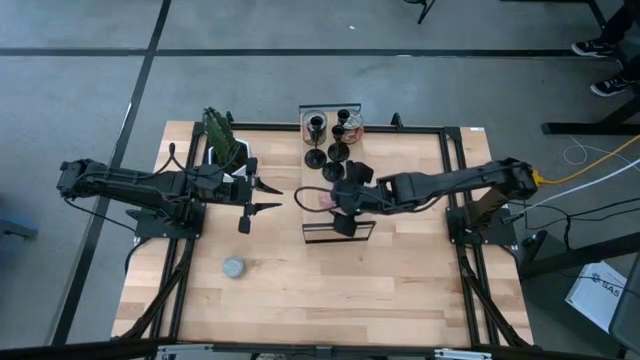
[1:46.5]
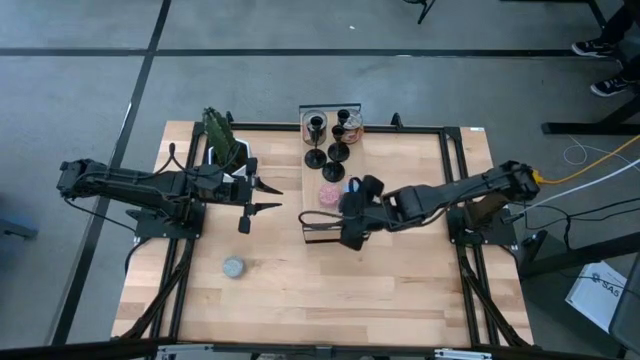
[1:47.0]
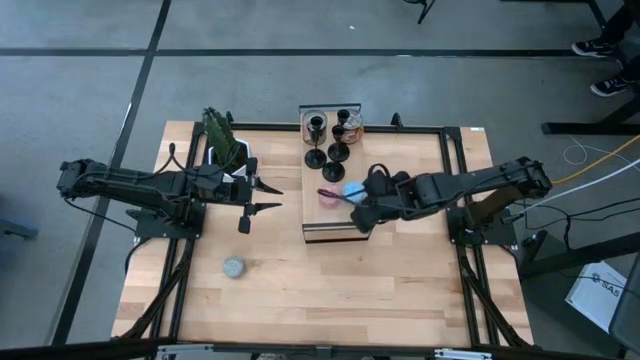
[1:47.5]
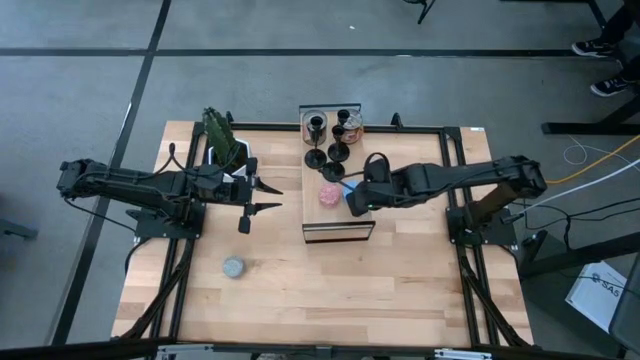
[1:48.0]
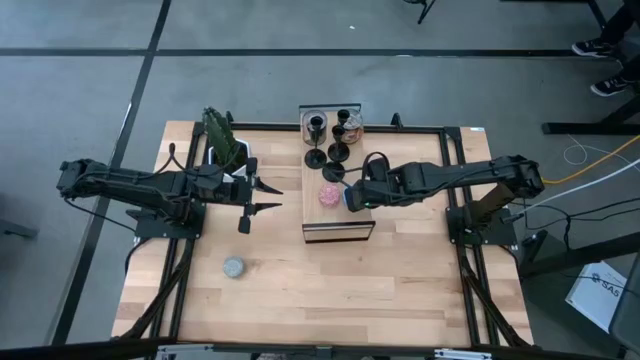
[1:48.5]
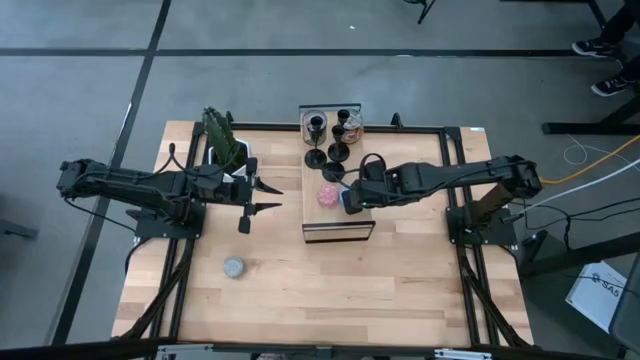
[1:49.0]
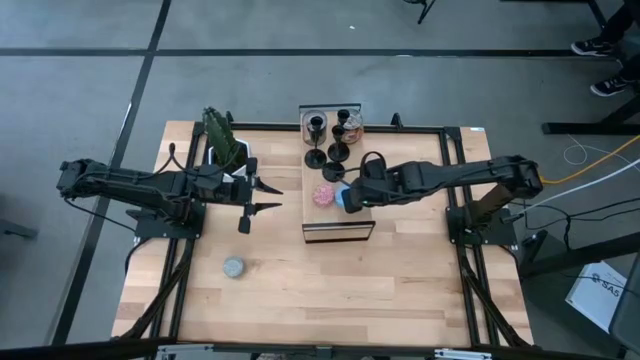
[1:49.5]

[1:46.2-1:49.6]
Task: Pick & Place candle stick holders
Adjust the small blue scented candle on the shelf

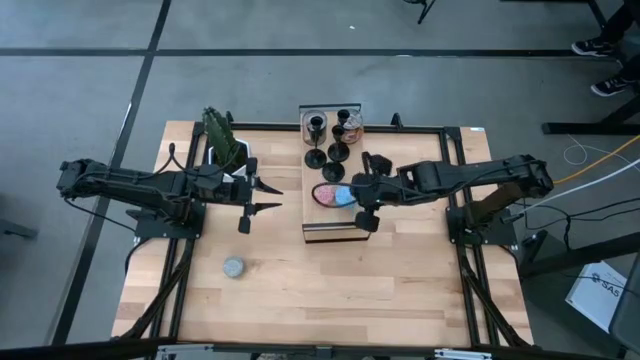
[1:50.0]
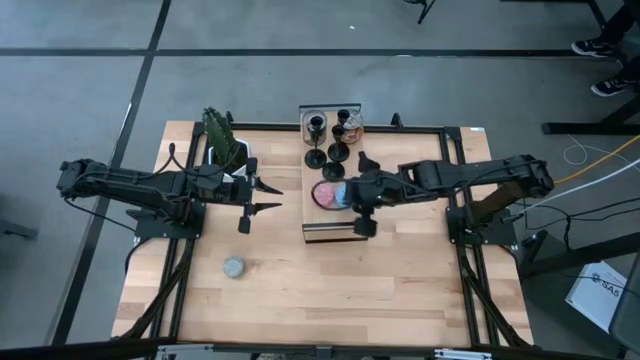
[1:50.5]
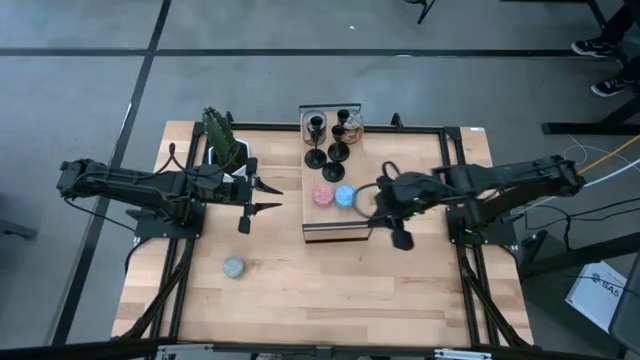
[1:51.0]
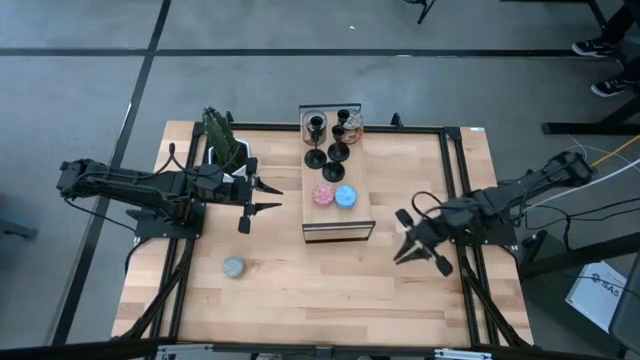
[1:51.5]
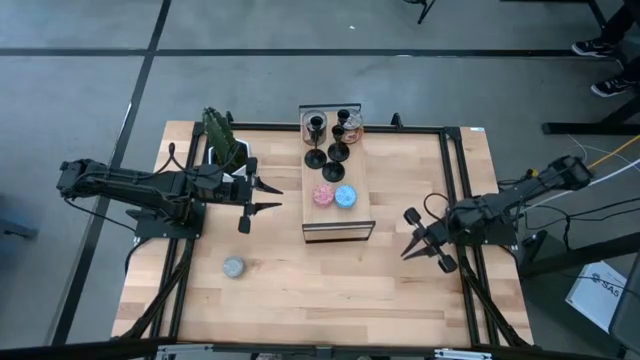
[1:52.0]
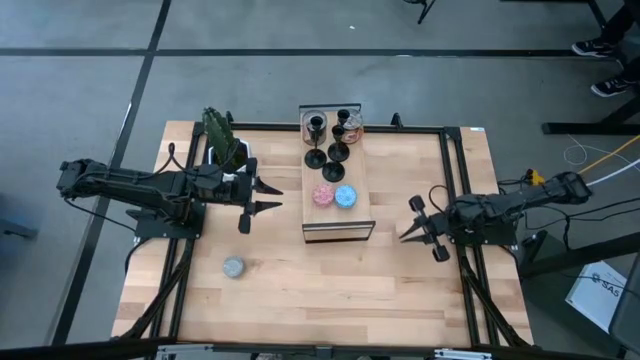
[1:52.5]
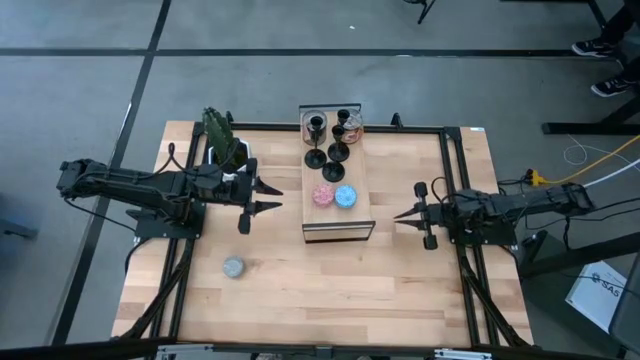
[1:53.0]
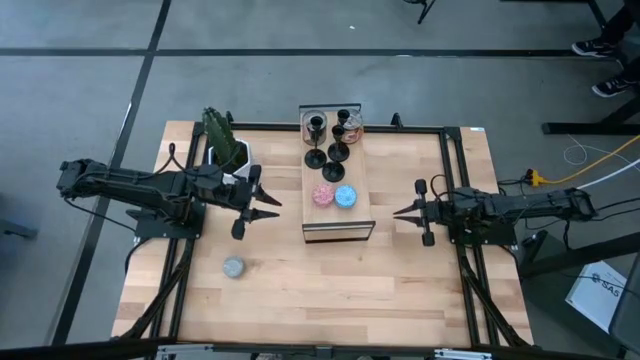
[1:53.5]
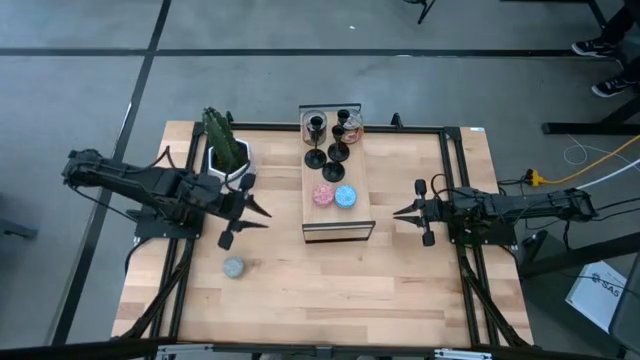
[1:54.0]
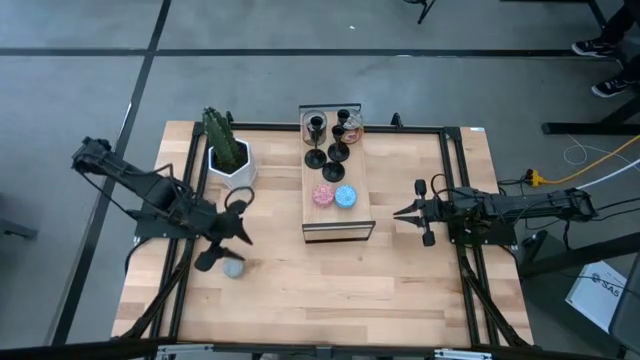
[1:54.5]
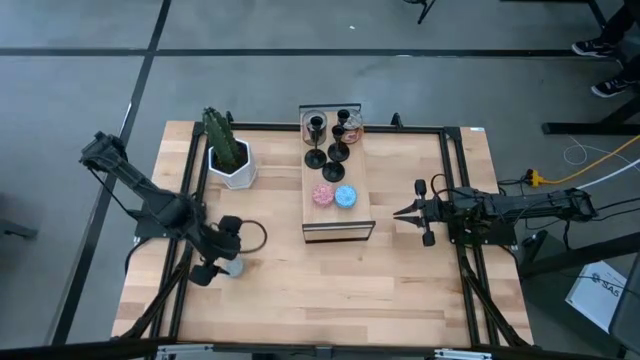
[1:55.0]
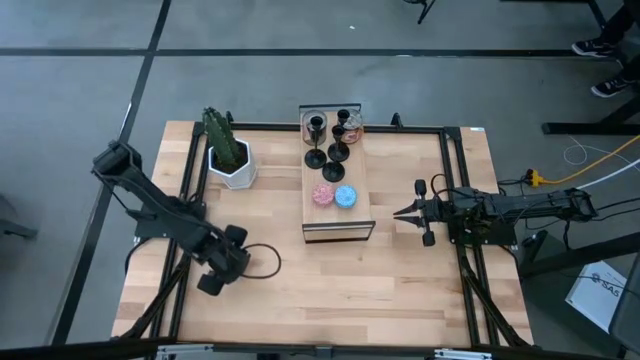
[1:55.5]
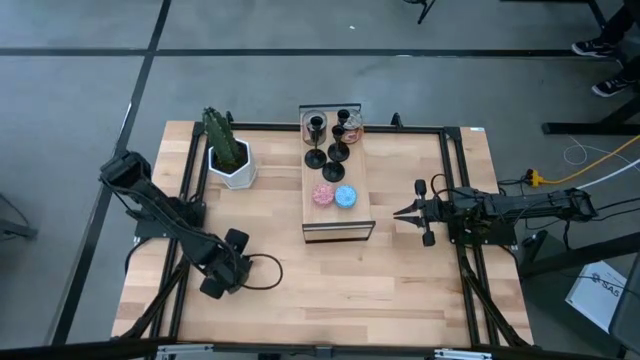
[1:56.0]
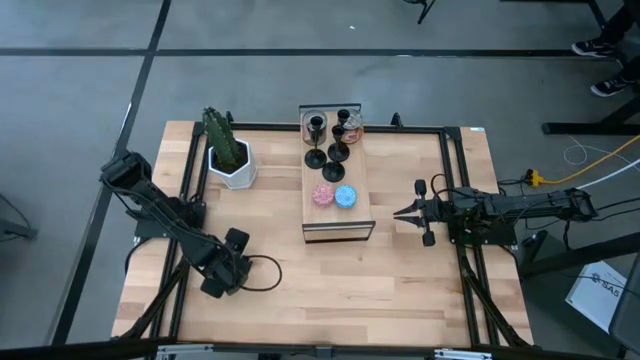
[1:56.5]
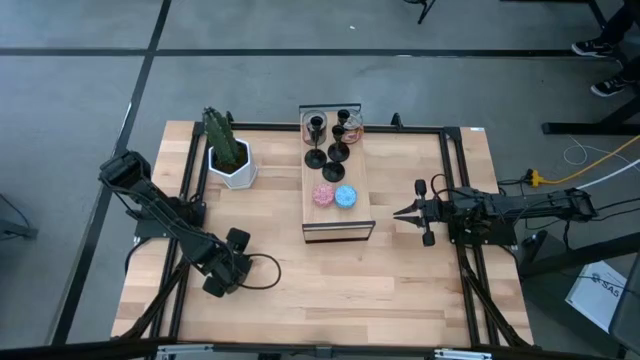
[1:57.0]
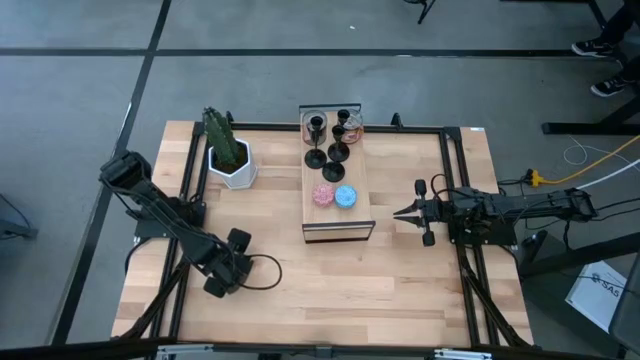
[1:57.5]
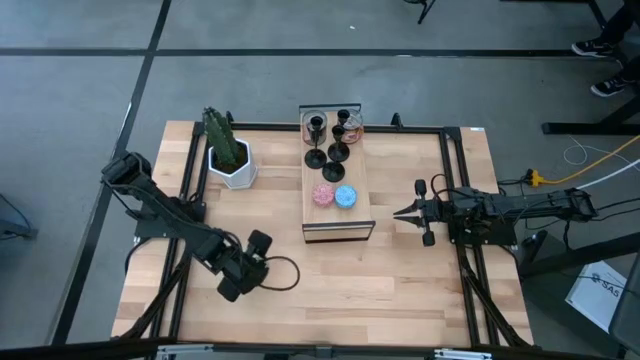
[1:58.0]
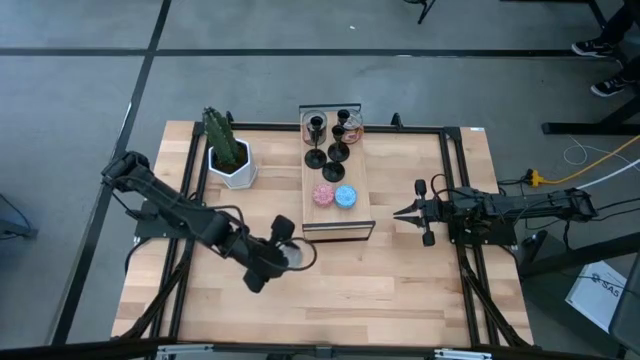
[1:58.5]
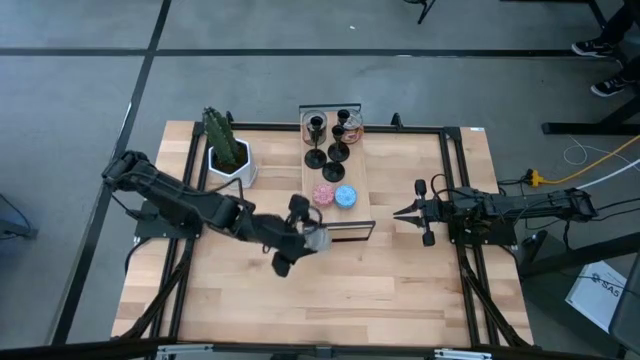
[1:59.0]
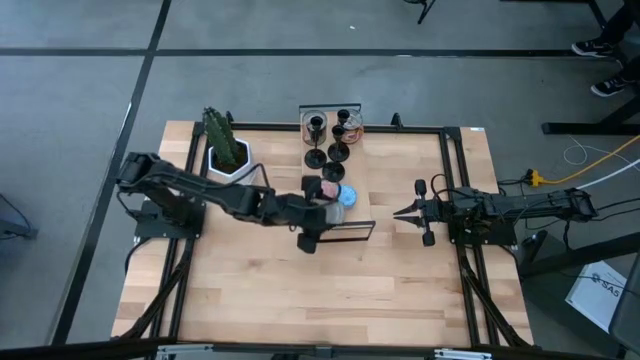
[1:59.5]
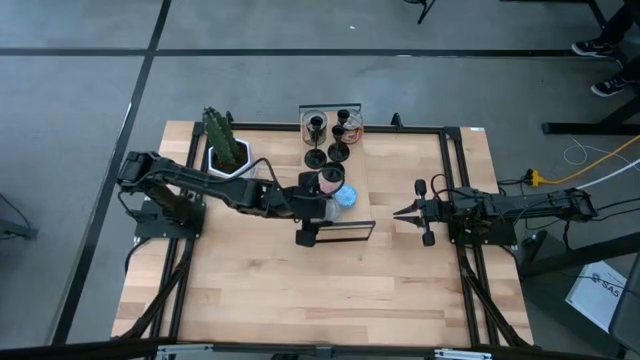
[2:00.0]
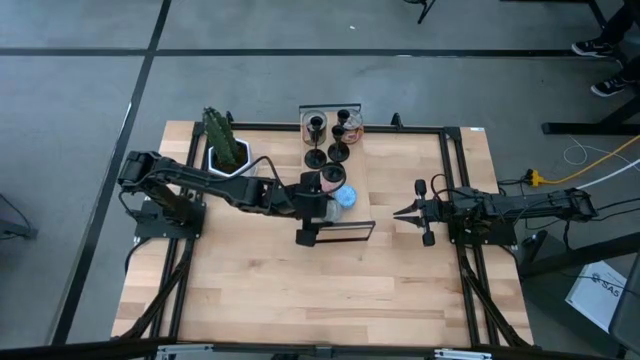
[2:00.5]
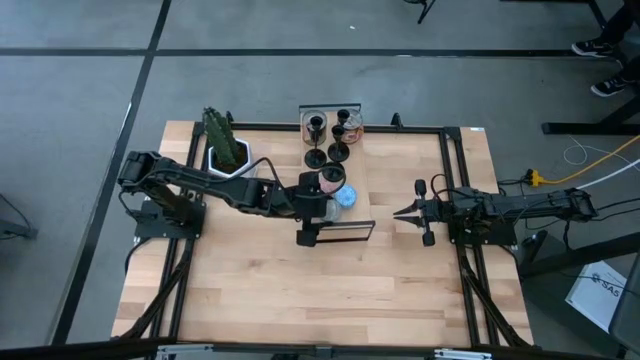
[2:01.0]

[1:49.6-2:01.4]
Put the small green scented candle on the shelf

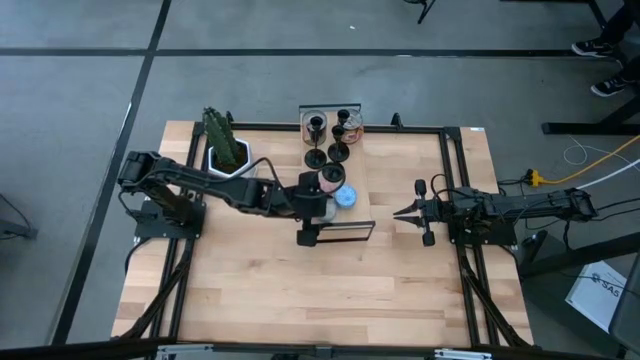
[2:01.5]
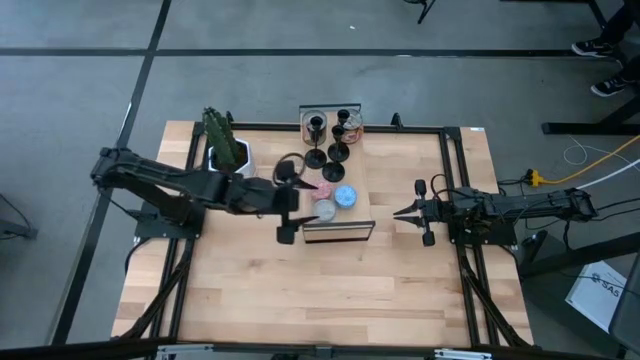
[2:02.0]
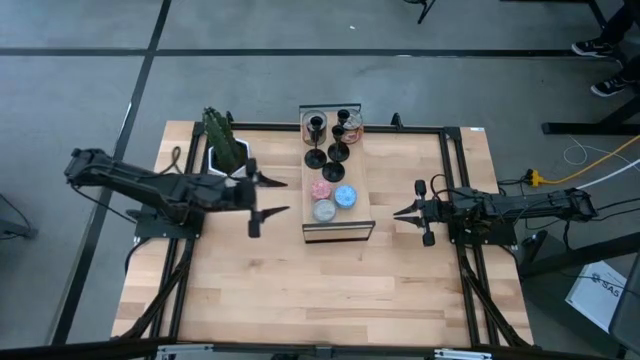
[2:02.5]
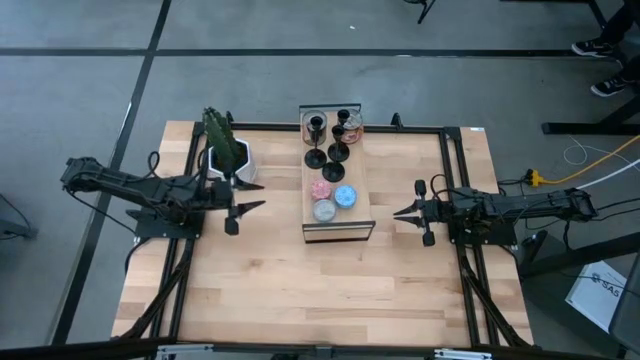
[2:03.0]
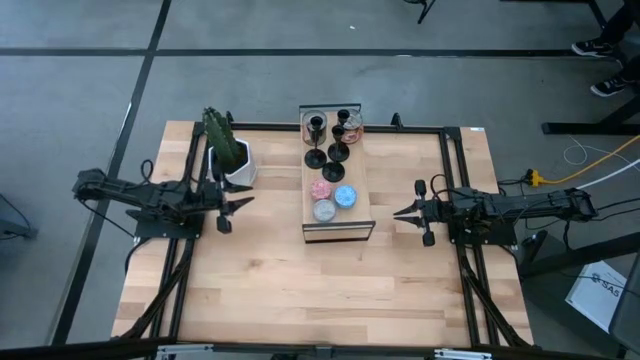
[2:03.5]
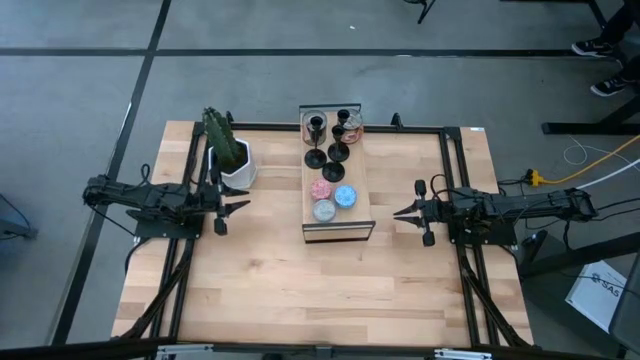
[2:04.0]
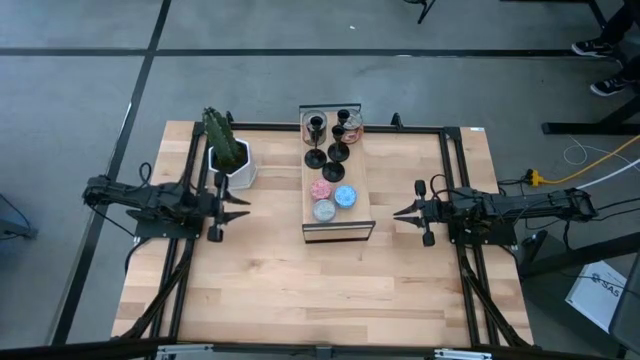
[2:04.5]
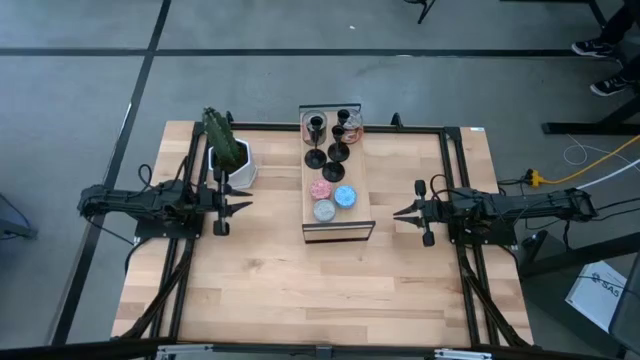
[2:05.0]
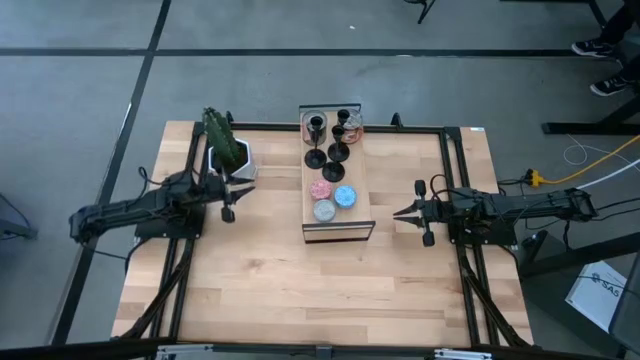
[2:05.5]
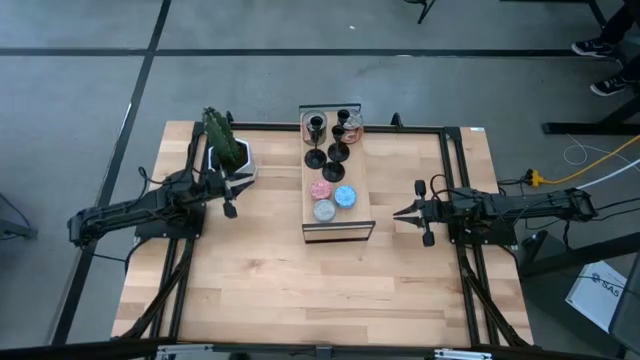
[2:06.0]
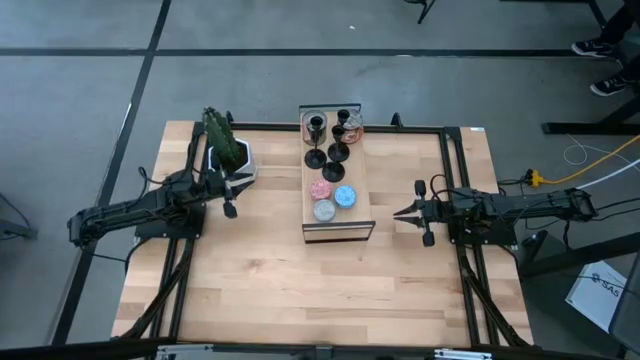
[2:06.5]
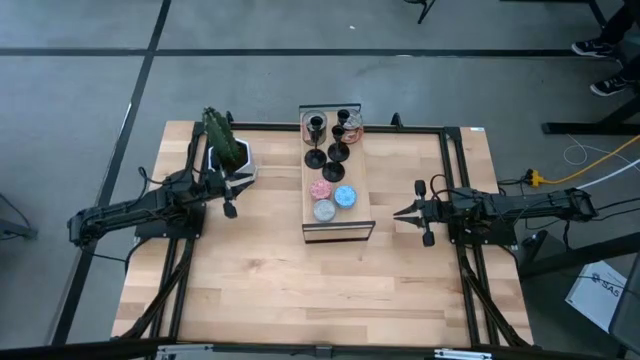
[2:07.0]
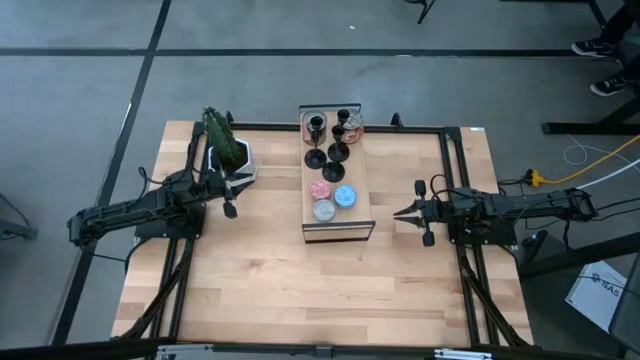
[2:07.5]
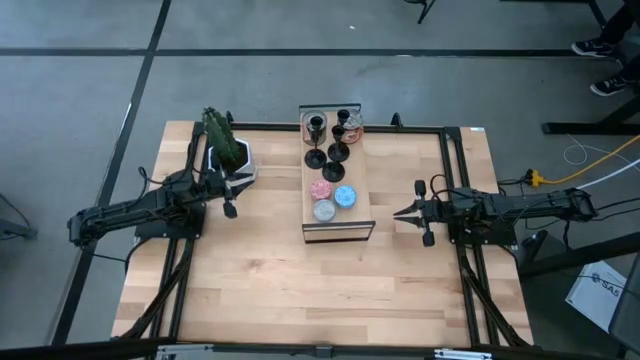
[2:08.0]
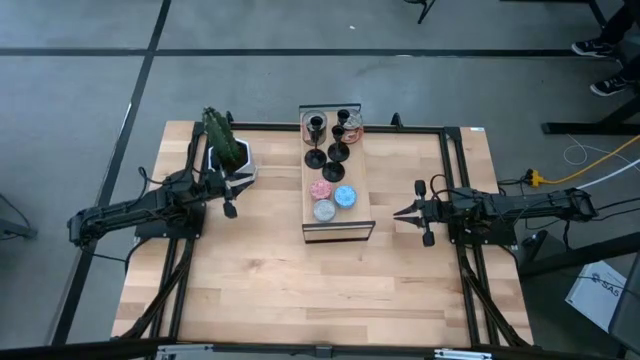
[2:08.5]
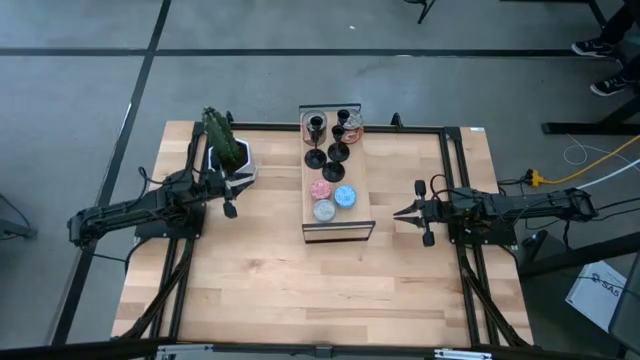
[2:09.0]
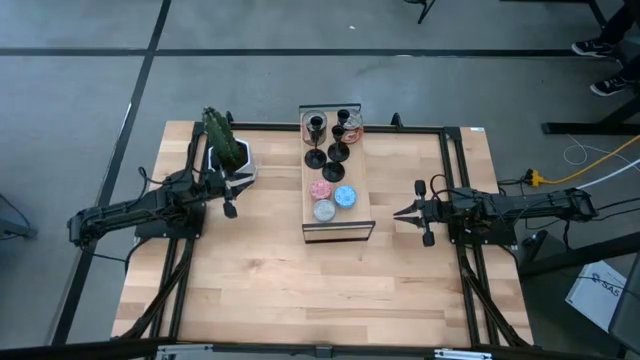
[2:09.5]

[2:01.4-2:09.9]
Return to Home Position
